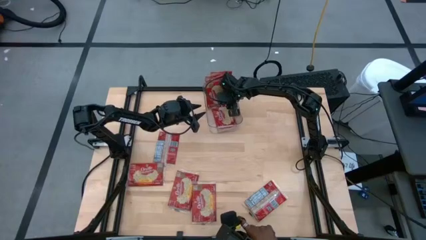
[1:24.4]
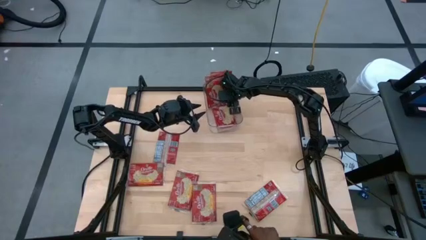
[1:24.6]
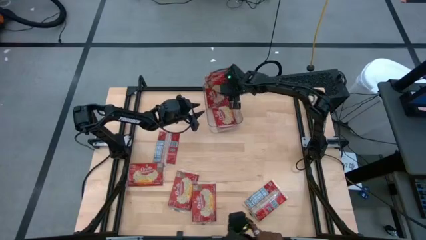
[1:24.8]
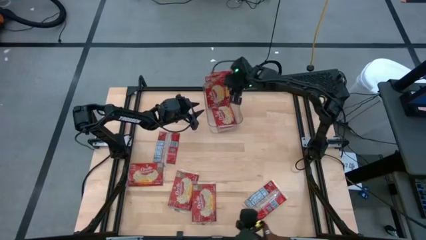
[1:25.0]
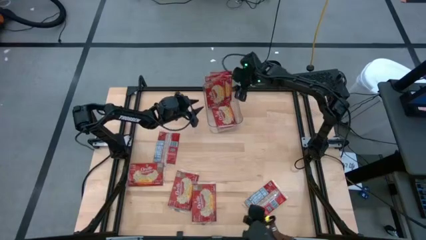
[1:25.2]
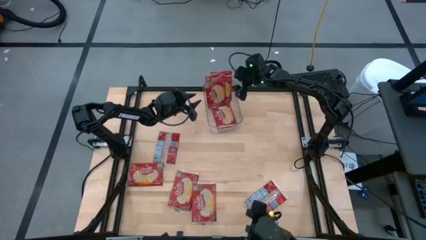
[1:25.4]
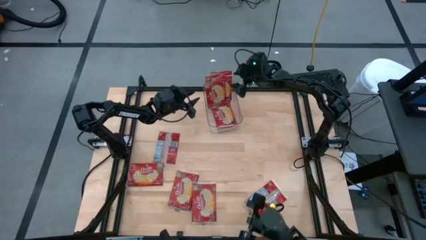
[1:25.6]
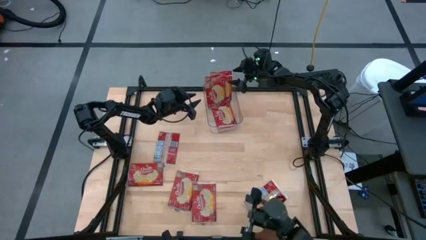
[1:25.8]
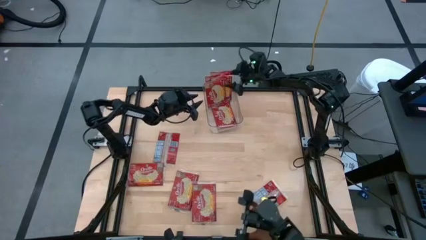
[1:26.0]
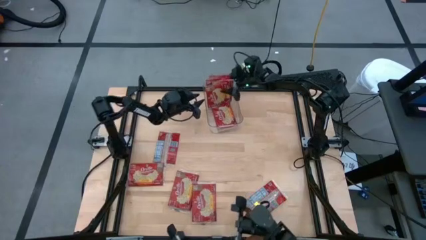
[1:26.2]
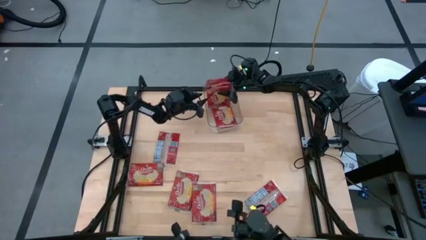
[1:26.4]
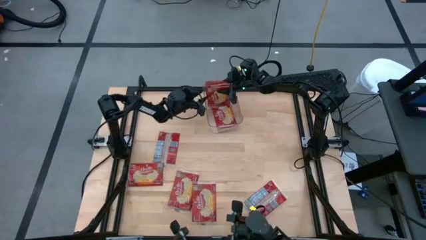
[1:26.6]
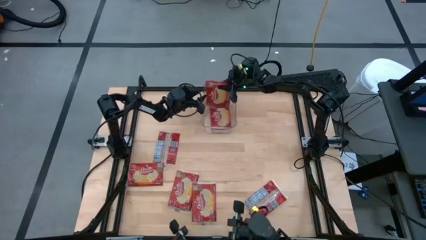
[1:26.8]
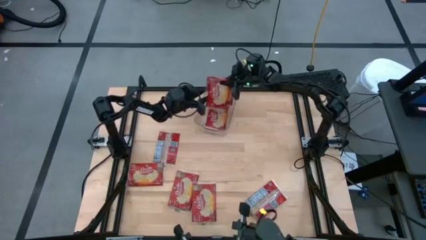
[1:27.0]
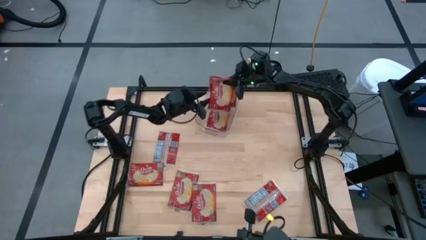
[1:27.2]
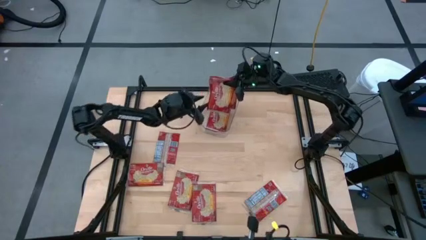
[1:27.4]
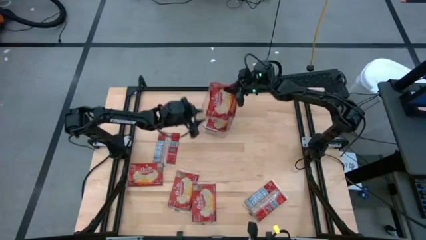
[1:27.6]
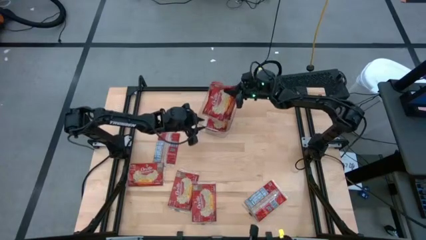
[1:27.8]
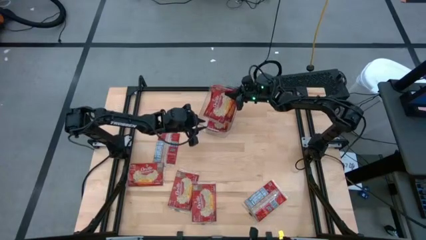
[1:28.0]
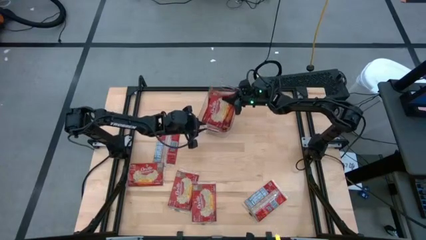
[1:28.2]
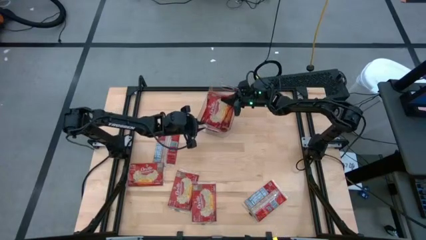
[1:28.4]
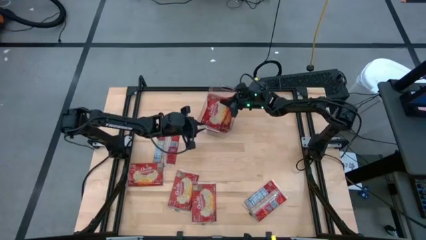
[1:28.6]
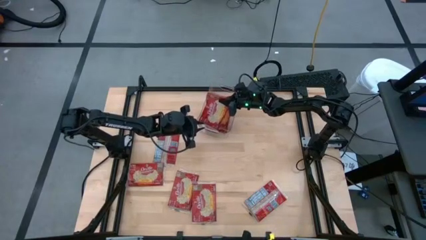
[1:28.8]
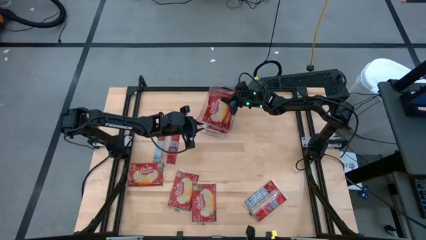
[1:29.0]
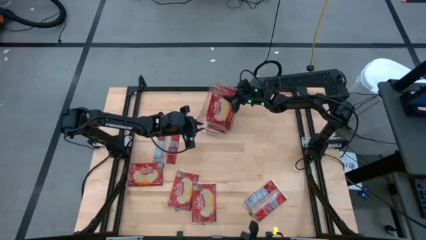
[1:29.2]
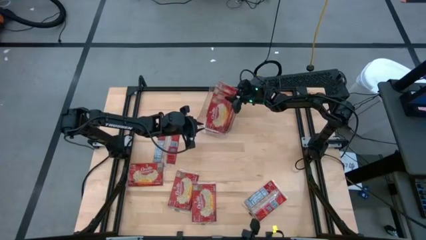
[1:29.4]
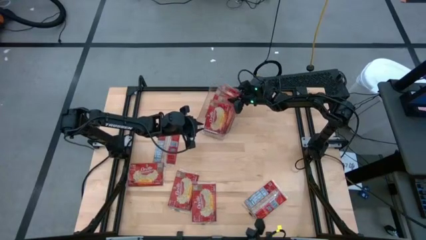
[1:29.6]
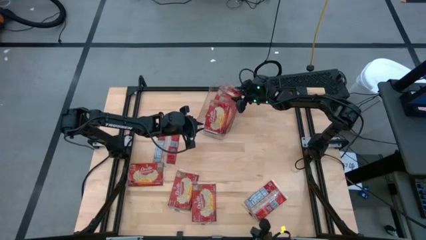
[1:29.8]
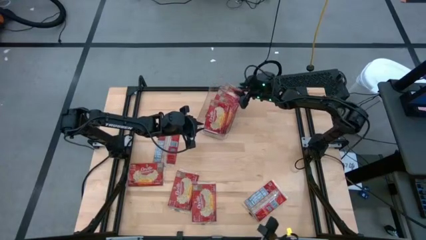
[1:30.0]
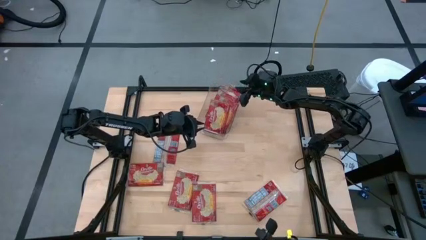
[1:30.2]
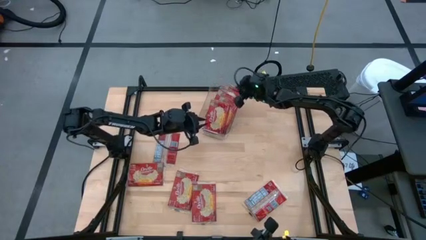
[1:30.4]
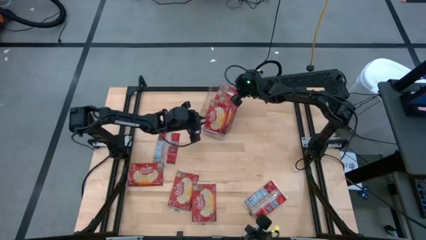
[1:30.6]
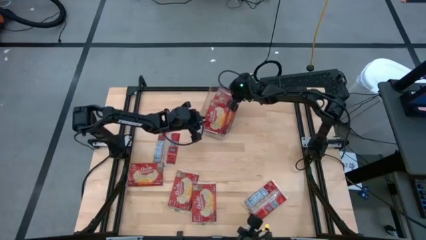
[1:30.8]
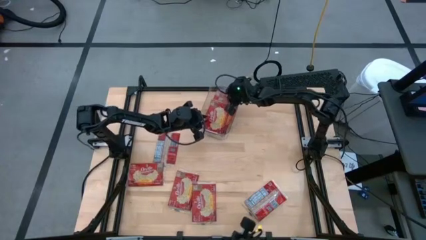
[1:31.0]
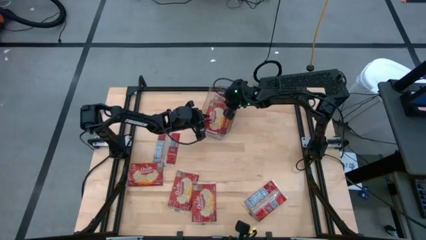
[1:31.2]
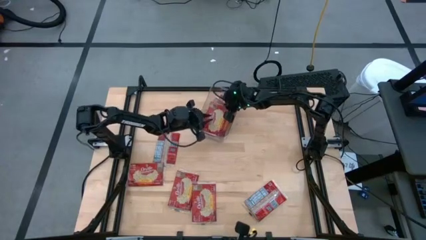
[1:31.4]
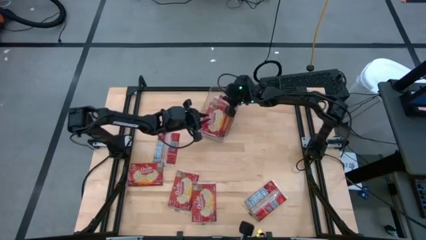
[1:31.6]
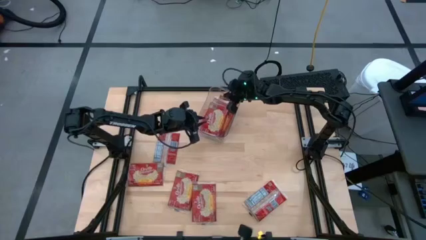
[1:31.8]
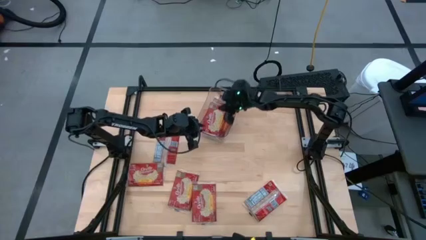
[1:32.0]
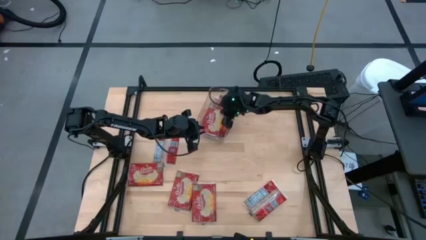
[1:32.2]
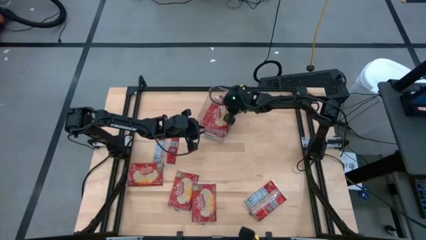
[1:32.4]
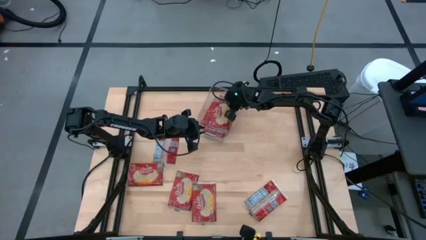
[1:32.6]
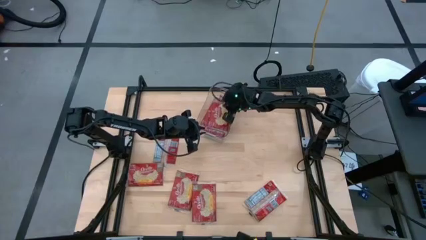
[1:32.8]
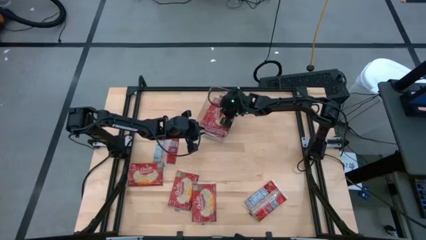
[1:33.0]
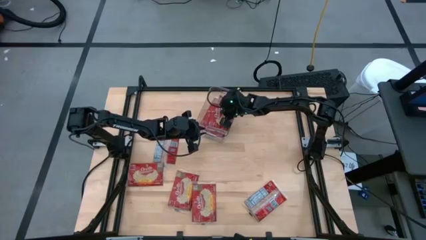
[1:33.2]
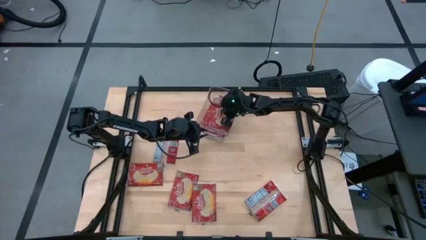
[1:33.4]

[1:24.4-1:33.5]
Task: Sort popcorn bags into baskets
Adjust the red popcorn packs in the transparent bin

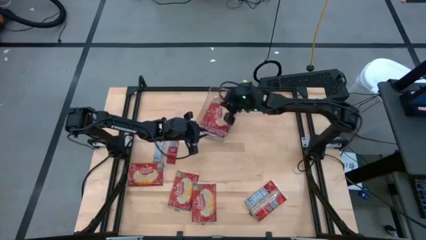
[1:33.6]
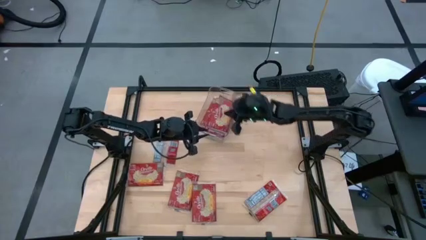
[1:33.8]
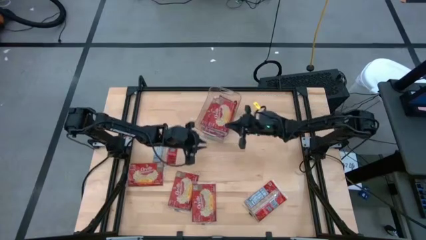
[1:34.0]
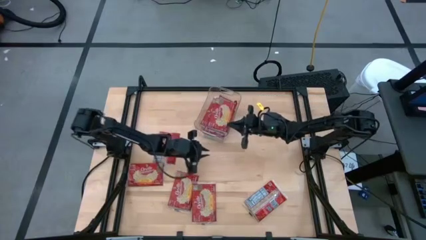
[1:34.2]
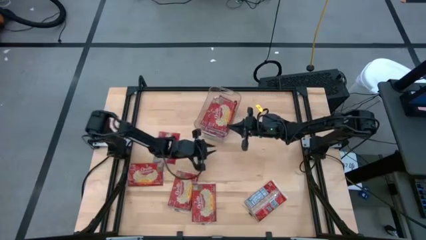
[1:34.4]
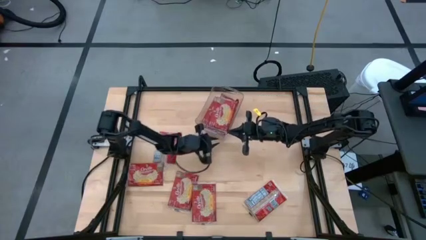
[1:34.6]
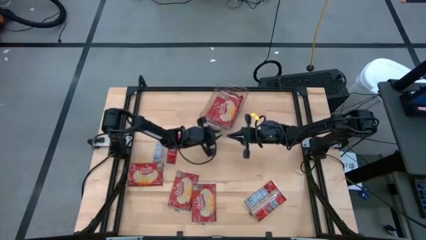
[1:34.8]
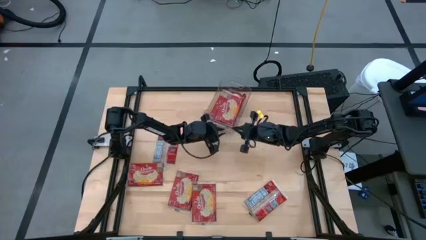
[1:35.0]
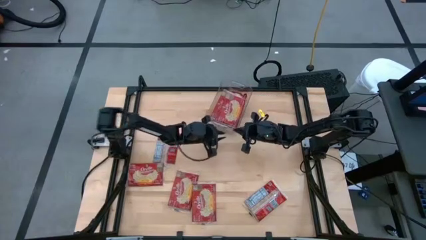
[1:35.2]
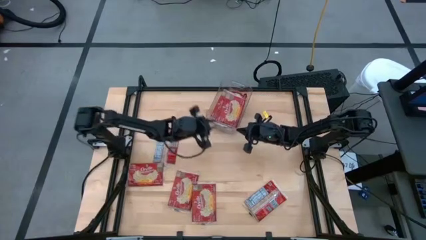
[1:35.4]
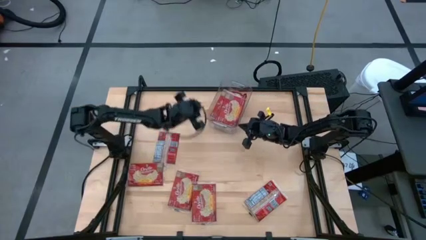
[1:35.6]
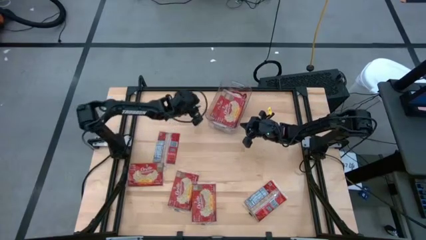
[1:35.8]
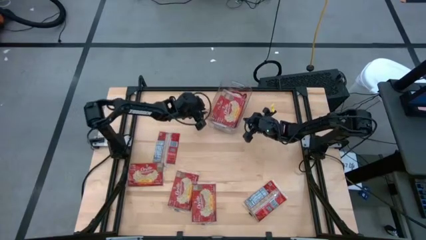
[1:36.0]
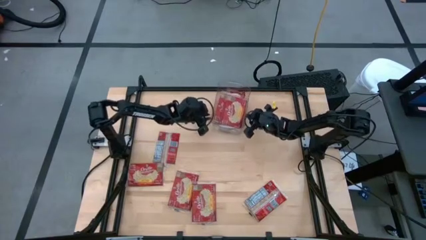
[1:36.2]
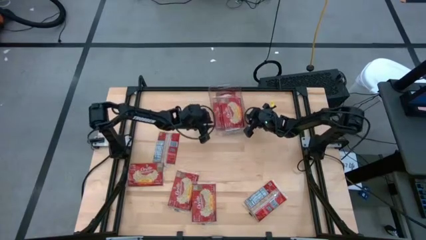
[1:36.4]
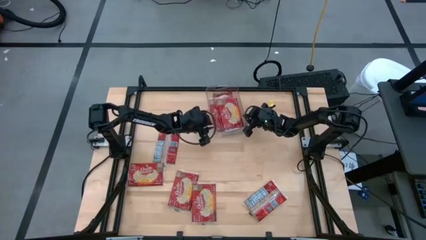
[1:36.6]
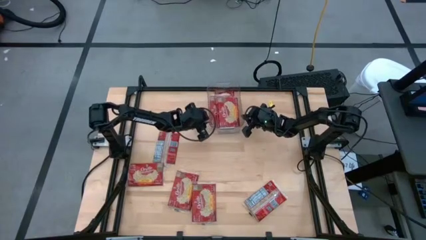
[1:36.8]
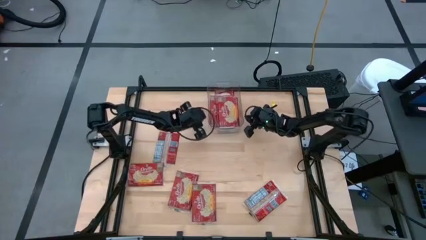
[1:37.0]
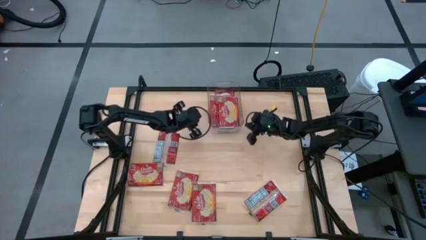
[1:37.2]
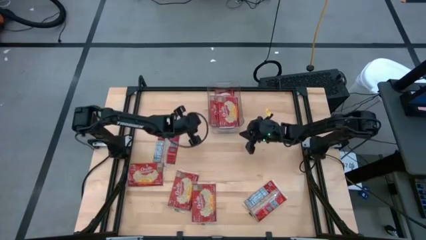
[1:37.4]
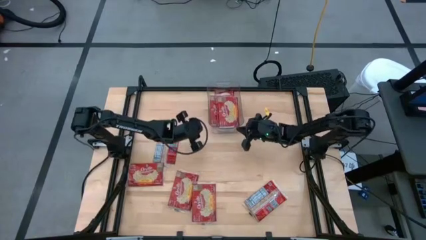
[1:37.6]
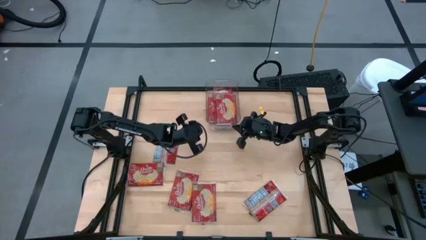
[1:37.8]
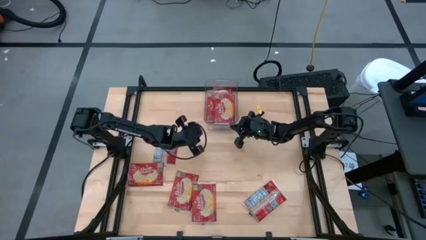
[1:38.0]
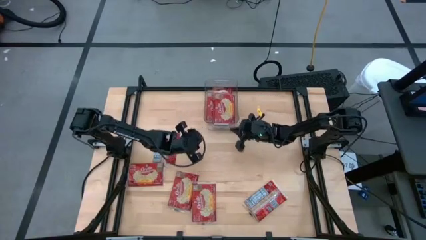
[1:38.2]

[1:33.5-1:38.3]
Adjust the transparent bin

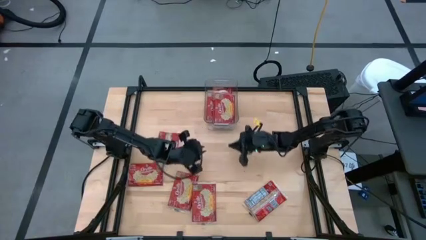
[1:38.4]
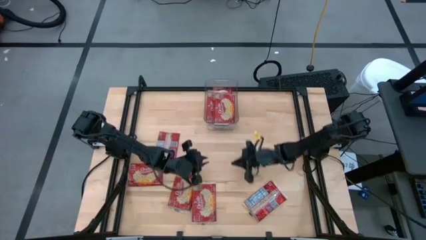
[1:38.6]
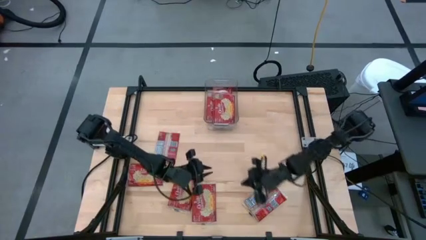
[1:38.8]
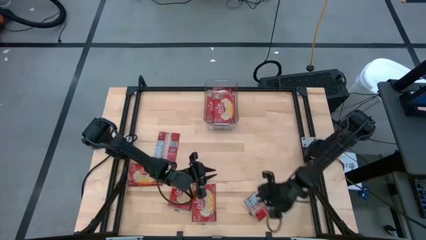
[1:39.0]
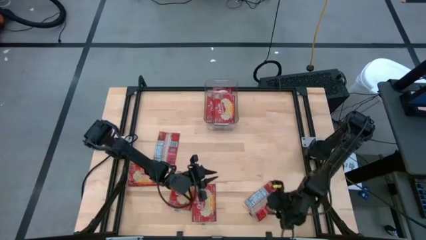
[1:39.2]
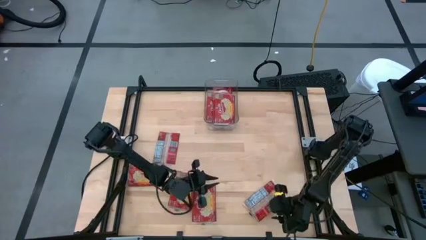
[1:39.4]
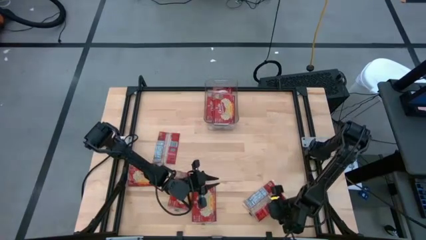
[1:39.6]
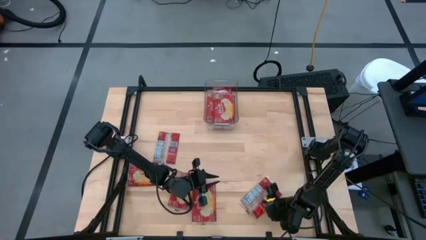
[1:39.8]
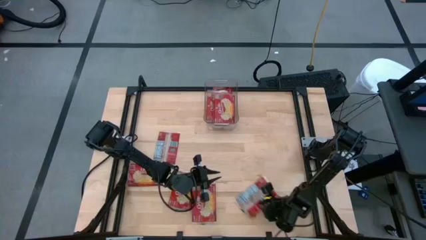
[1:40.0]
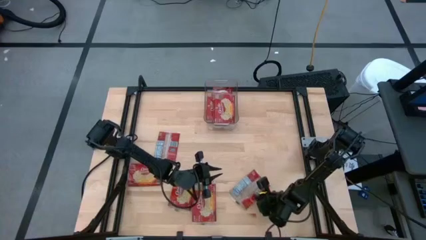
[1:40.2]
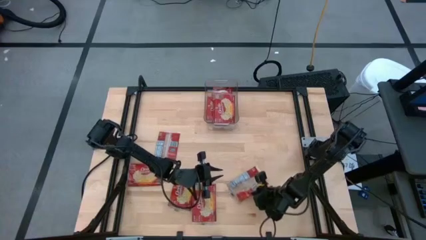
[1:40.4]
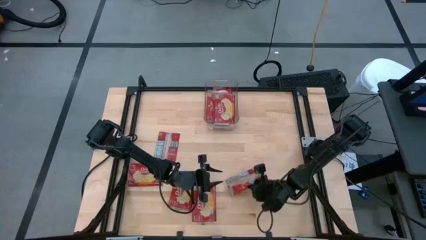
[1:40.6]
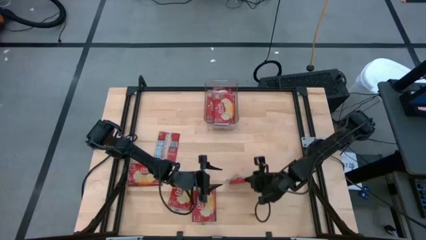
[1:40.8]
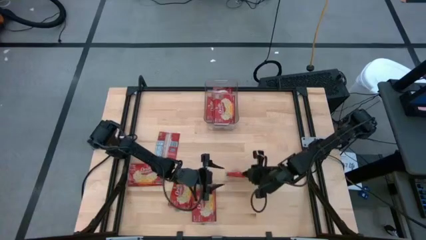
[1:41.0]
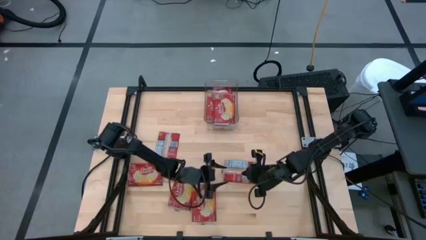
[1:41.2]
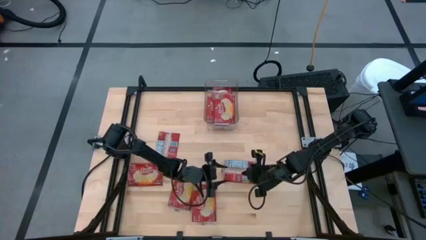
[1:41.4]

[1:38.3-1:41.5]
Put the red popcorn pack into the transparent bin
